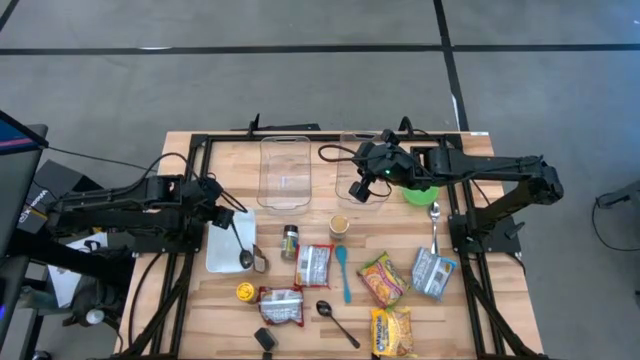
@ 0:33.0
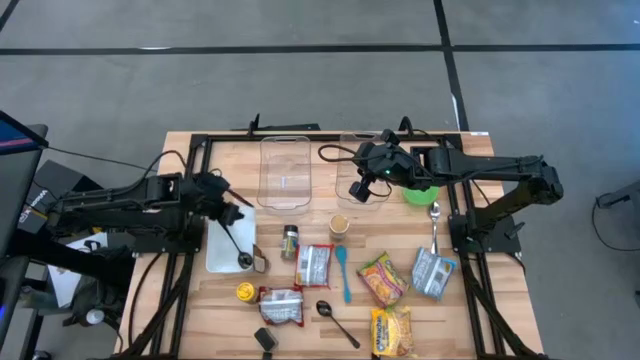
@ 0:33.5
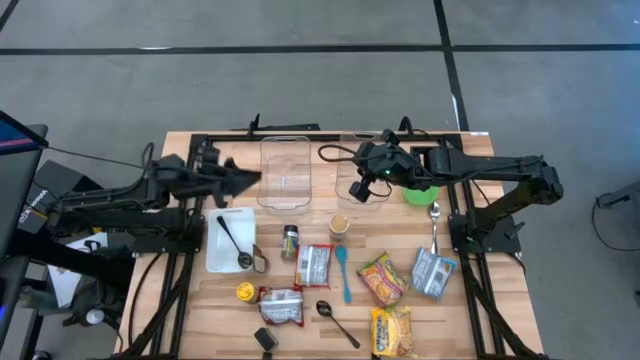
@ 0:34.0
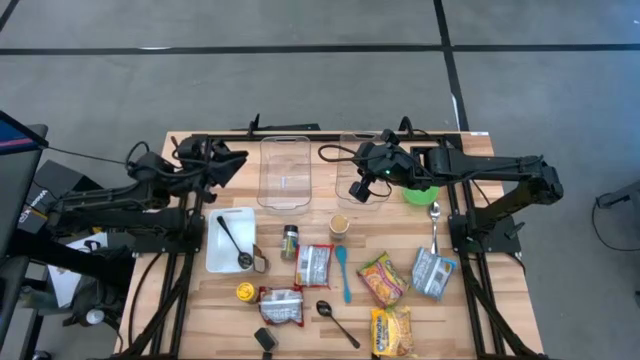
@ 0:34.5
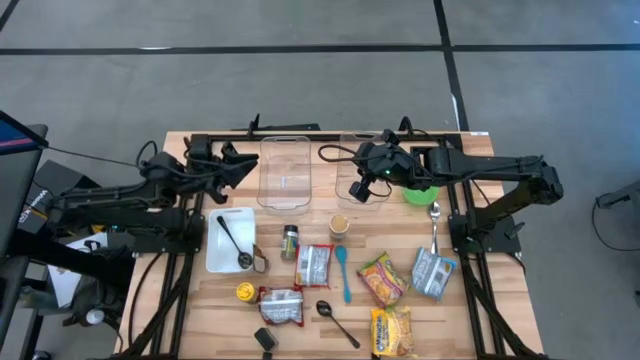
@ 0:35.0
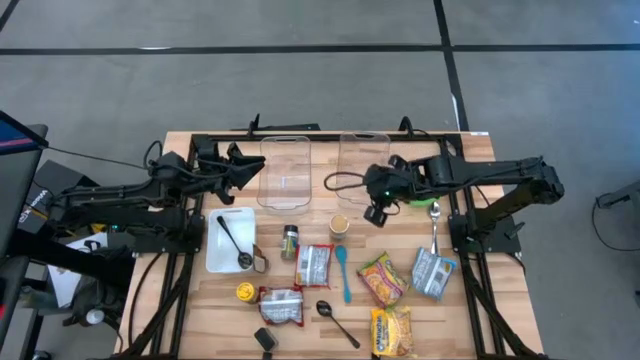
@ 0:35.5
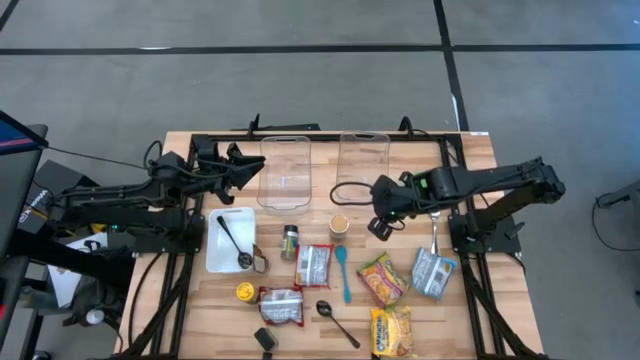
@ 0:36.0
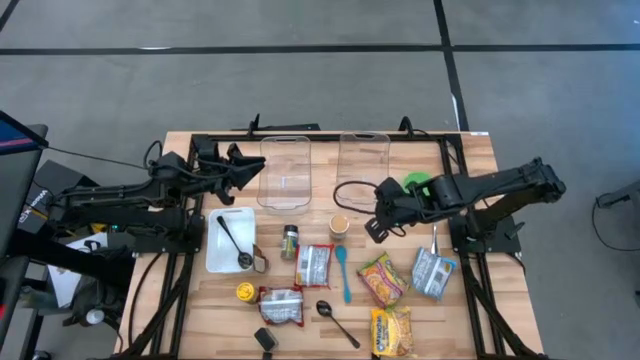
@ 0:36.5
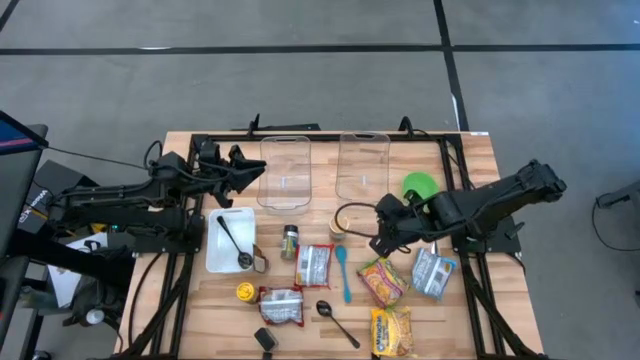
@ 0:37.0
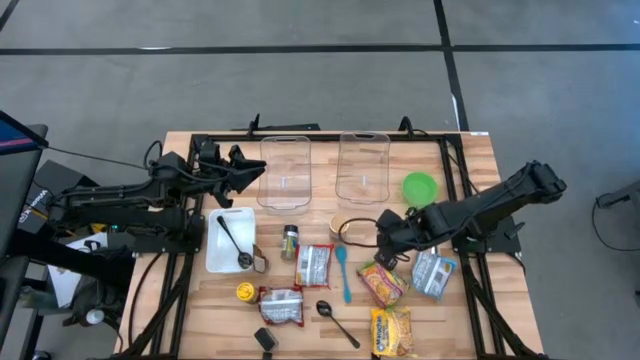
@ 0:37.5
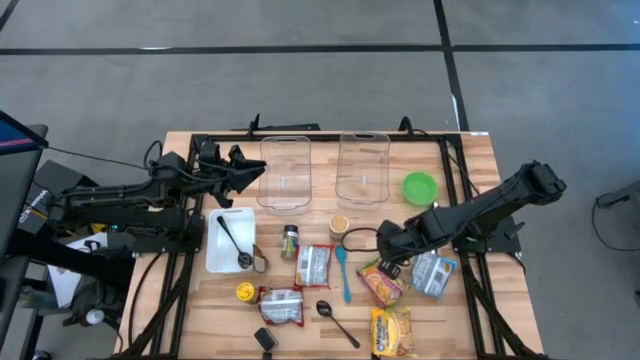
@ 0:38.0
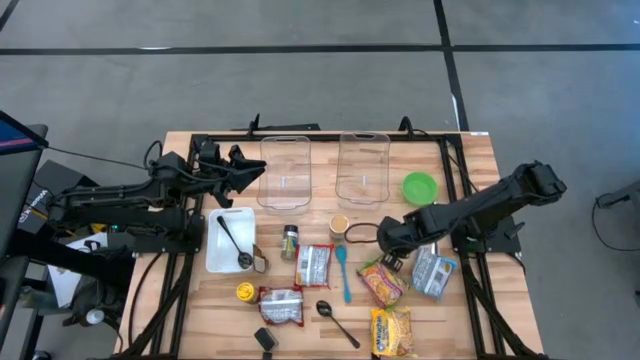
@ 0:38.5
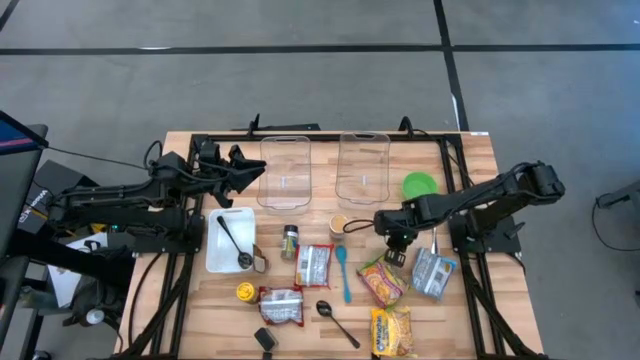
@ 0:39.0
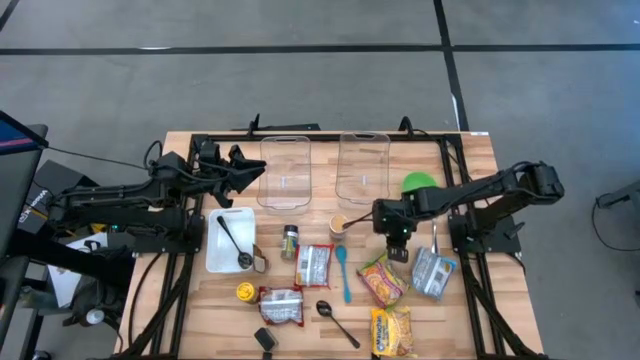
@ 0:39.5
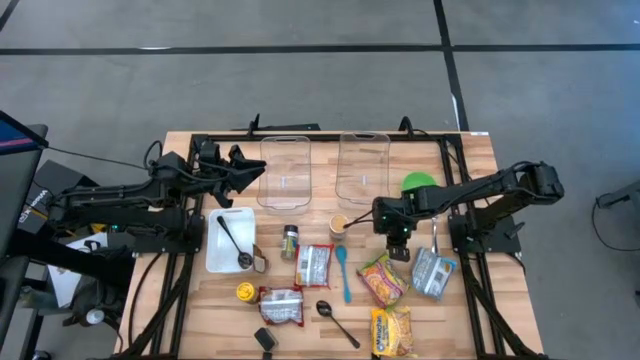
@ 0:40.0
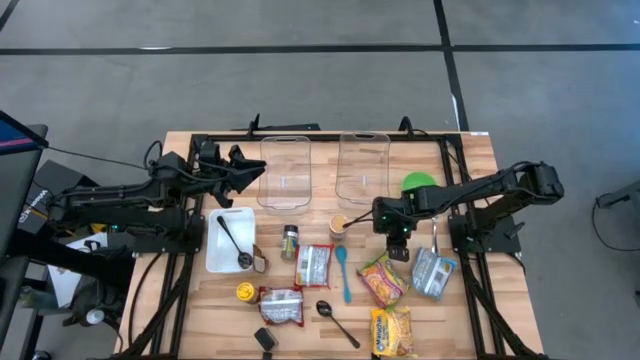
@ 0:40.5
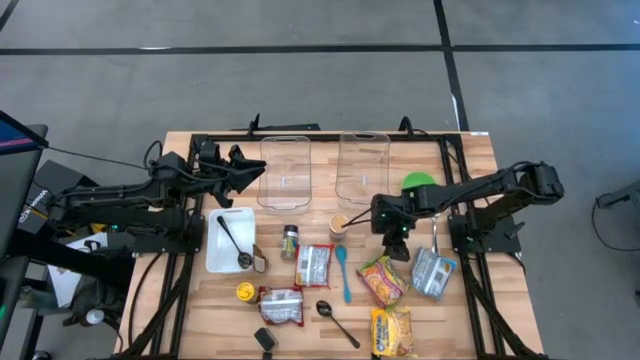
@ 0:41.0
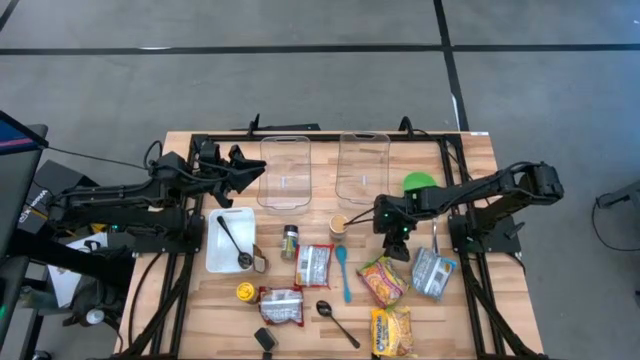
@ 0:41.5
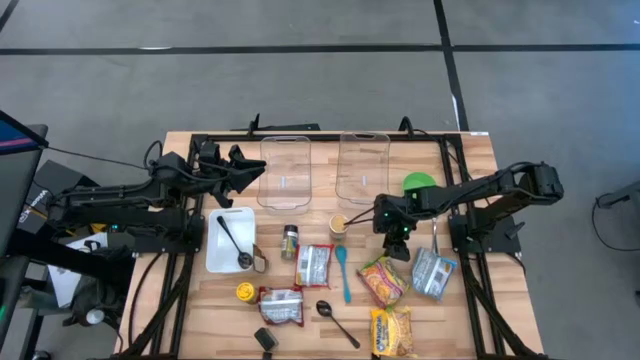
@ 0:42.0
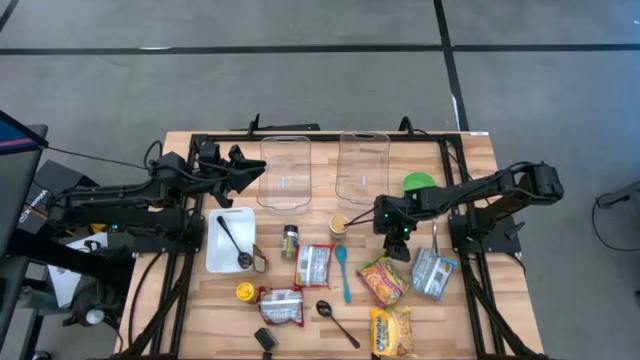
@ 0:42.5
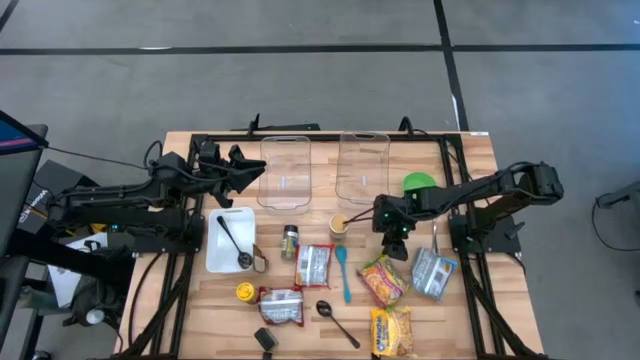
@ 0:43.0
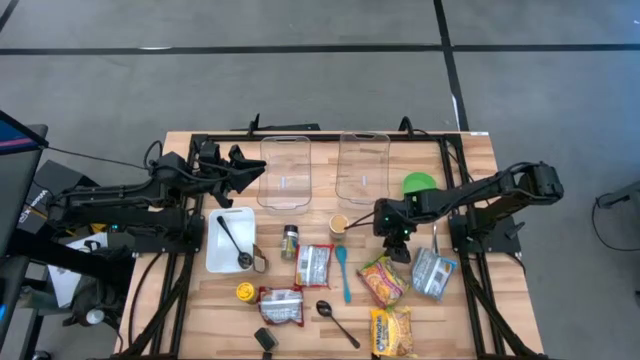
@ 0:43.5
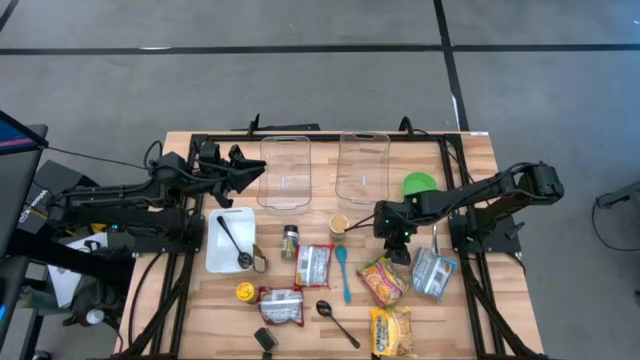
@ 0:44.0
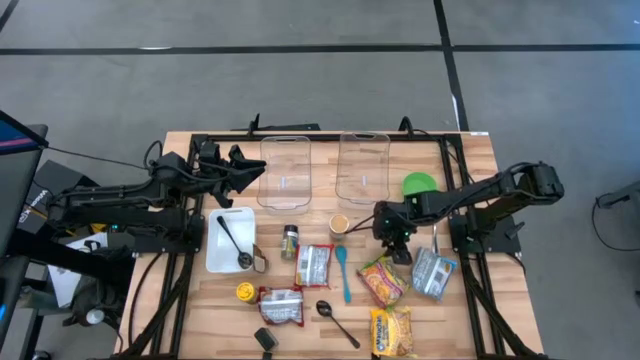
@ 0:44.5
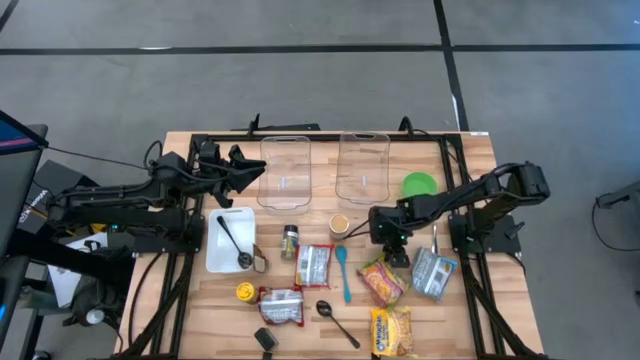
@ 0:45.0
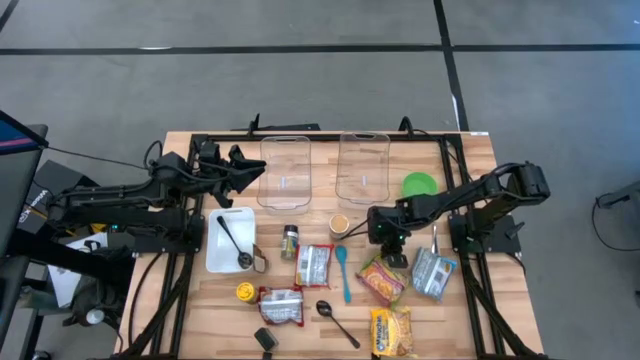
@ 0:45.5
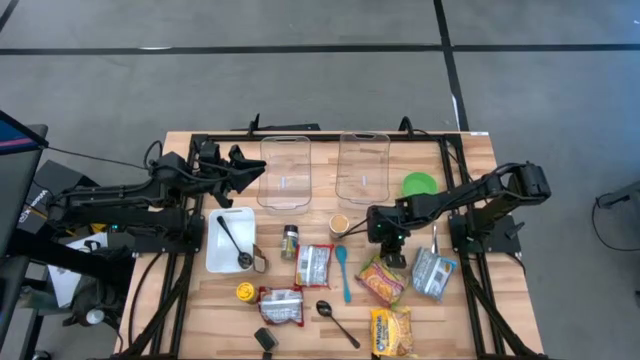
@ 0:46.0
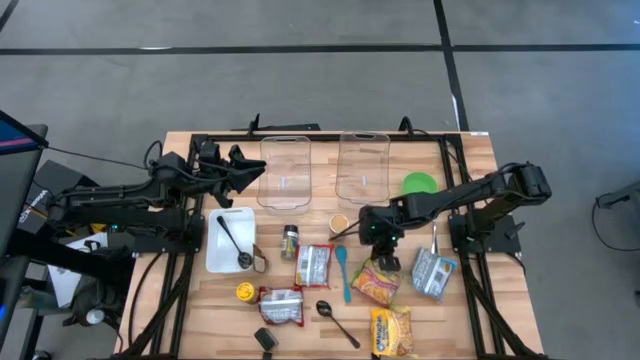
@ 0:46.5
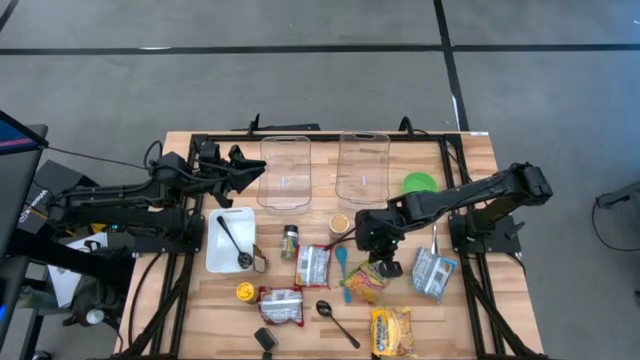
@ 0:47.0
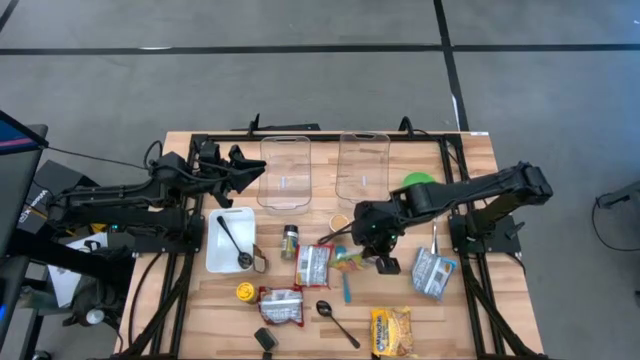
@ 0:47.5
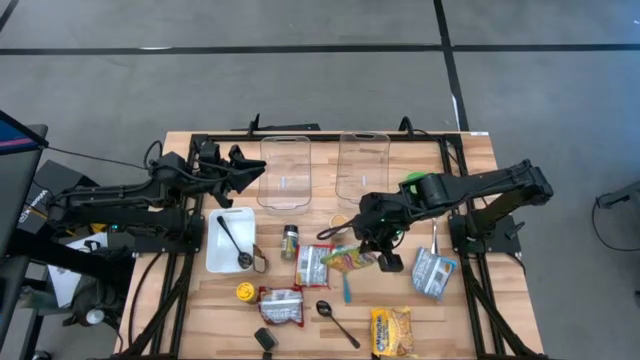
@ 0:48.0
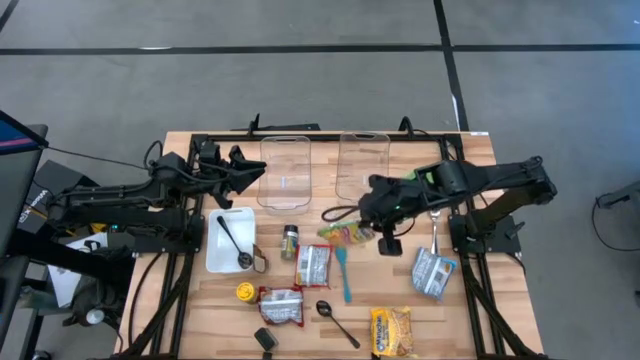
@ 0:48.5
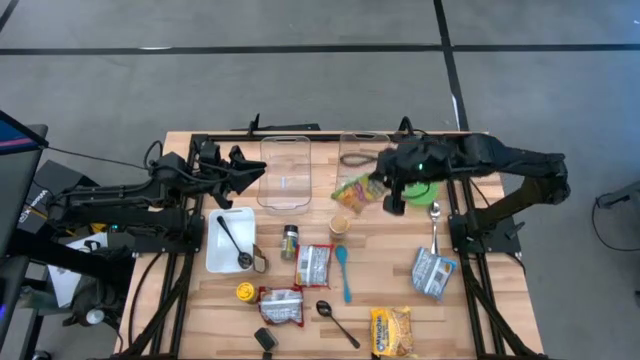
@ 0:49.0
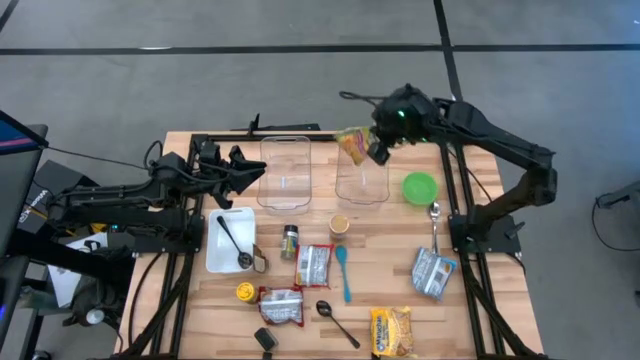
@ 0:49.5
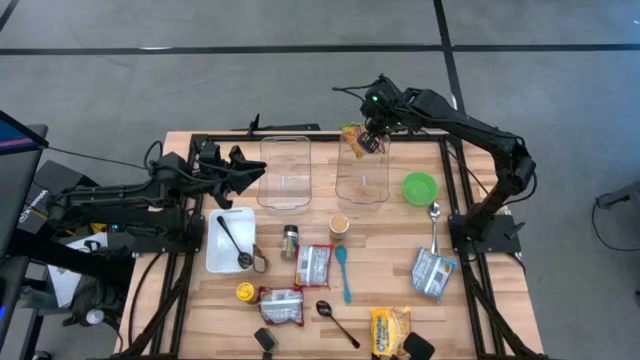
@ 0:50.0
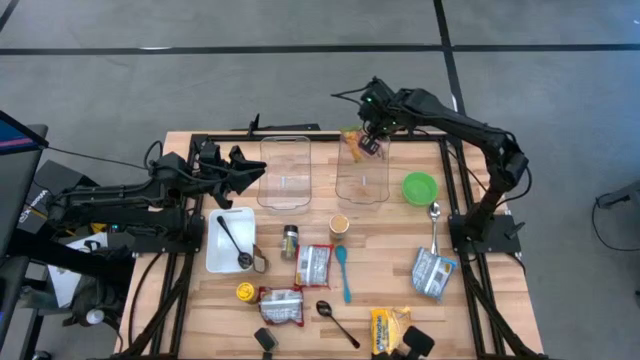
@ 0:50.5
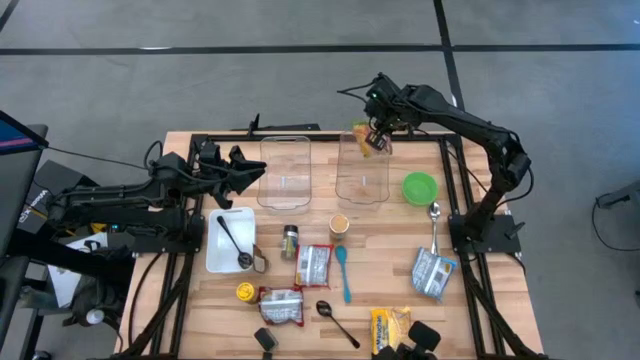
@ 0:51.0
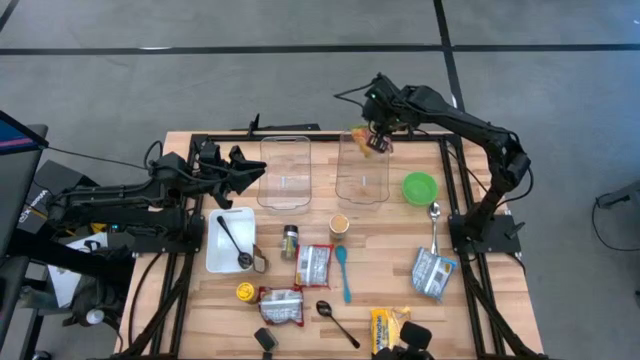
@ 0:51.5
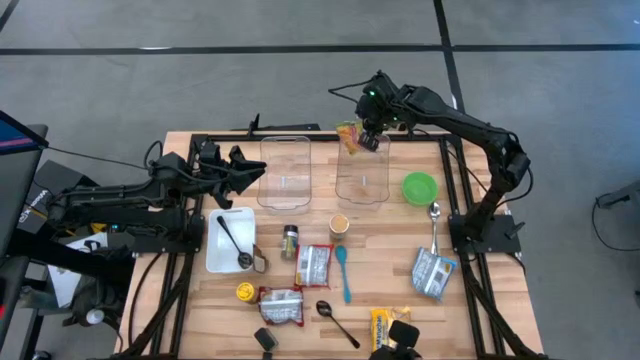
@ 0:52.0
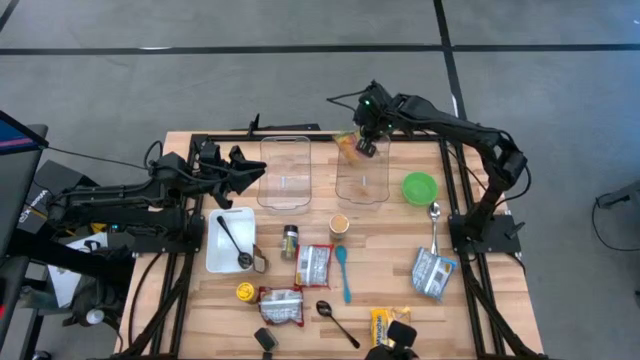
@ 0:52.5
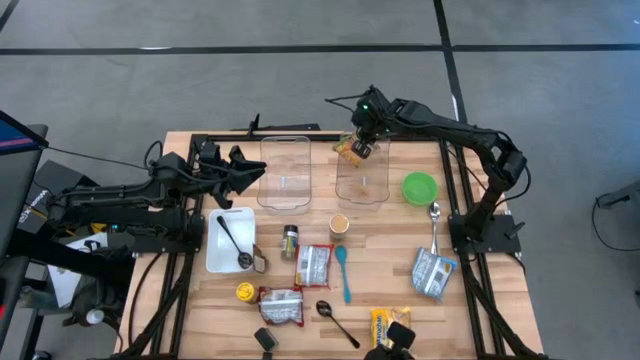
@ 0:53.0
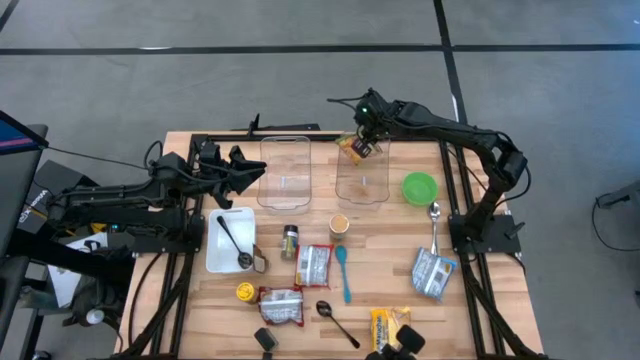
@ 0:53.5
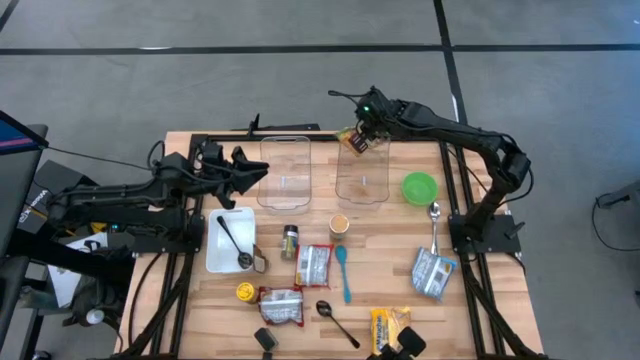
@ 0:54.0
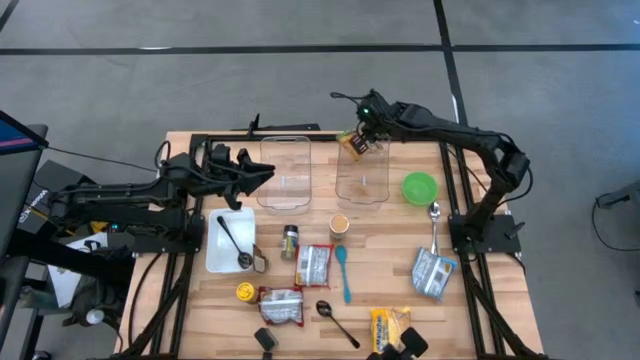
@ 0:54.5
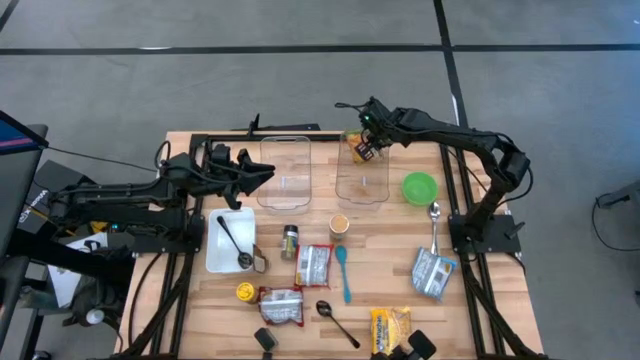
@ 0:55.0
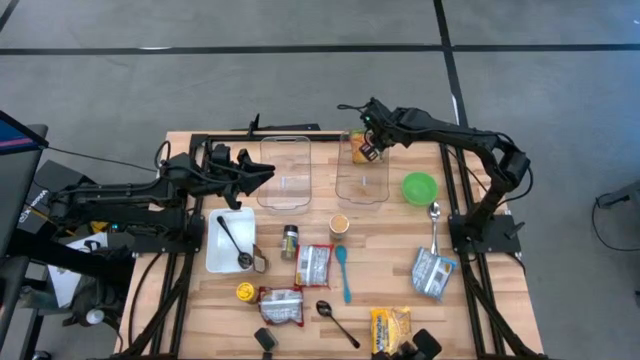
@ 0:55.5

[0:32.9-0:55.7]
Task: Pick & Place Food Item
Put the green noodle pack into the right transparent bin
